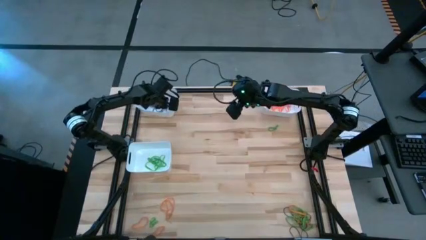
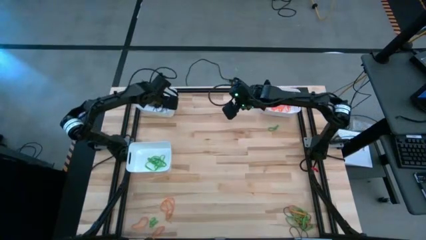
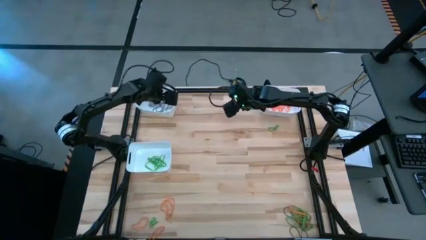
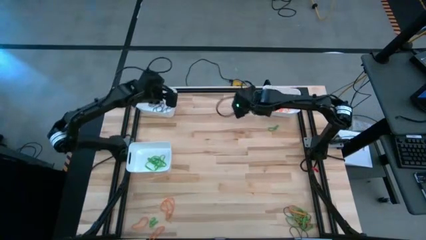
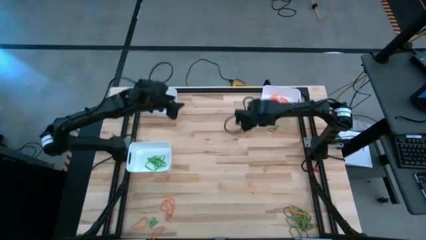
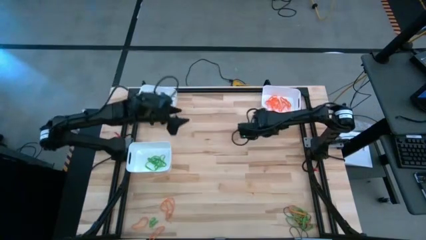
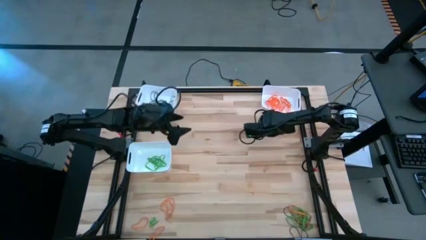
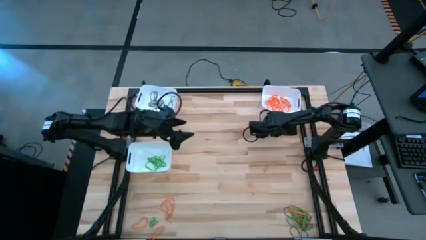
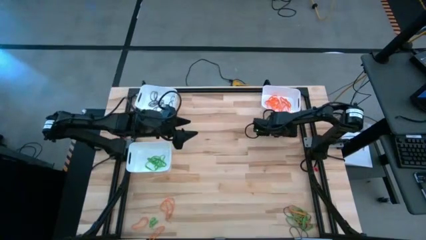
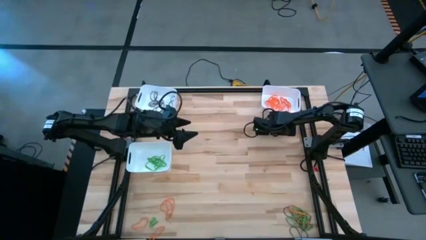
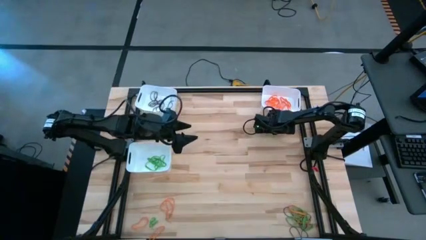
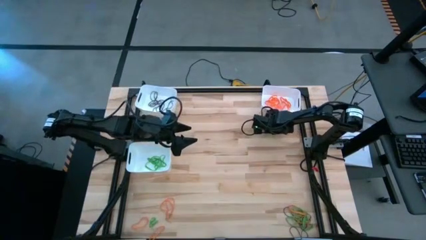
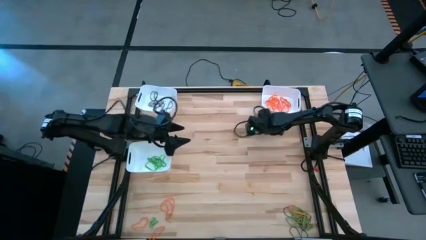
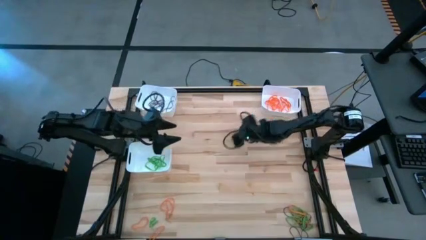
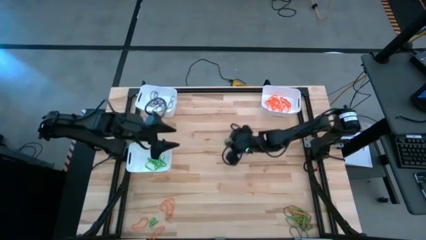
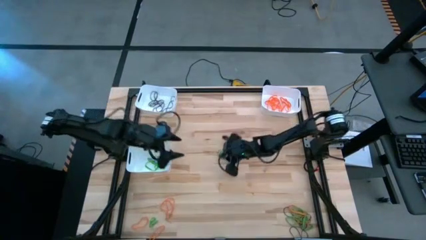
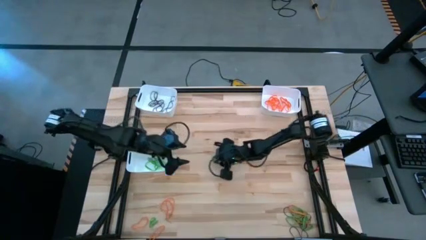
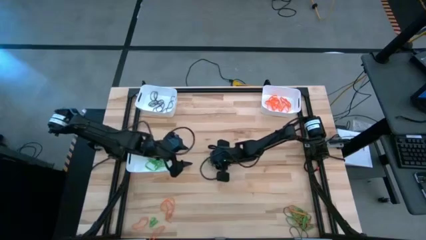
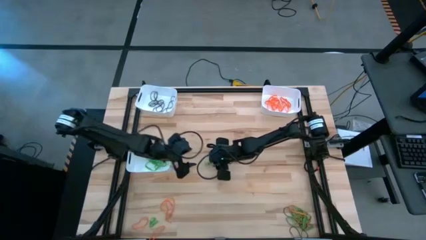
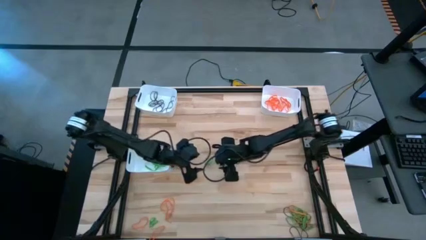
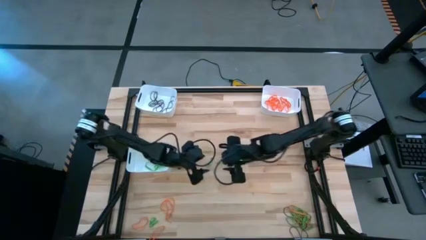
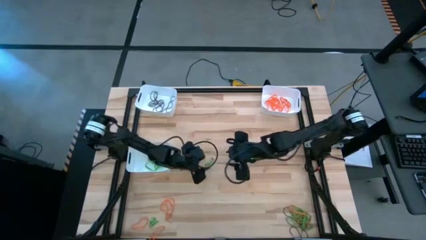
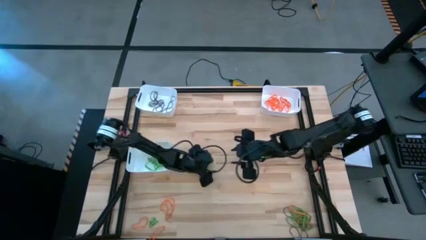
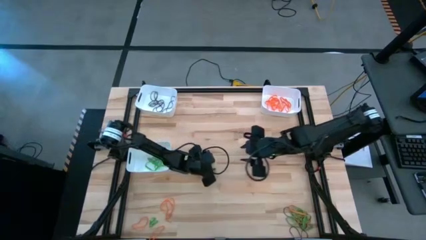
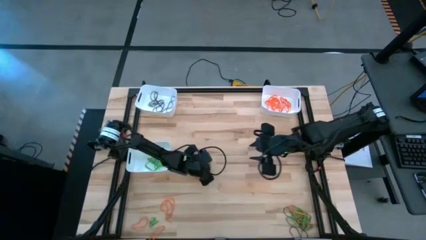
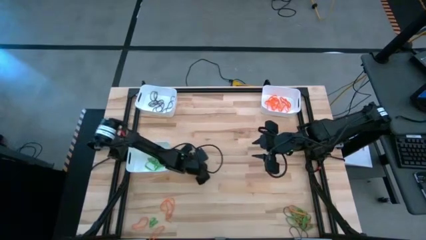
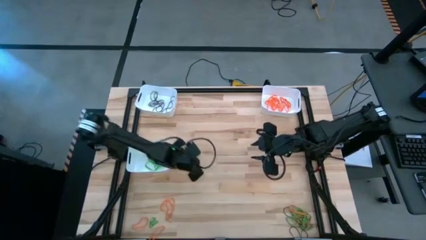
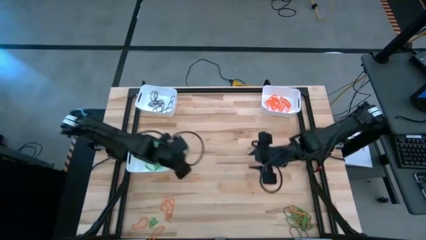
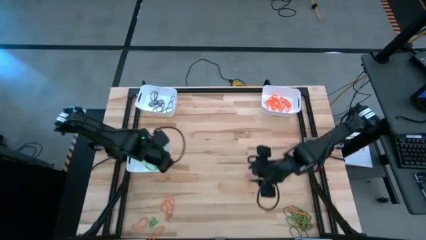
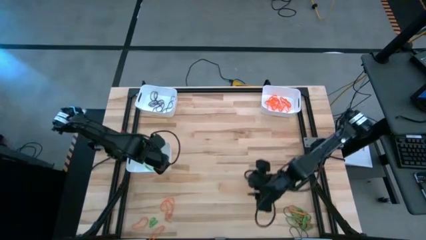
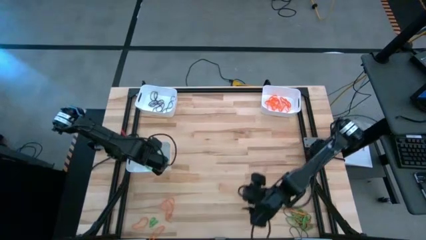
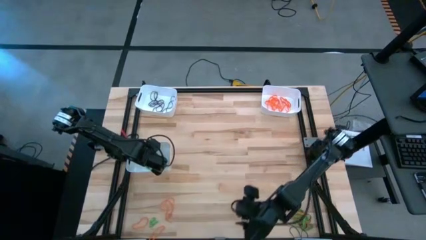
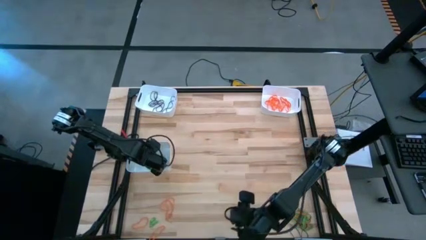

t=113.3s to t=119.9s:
Task: Sort rubber bands into baskets
Put the green rubber band into the bottom white bin

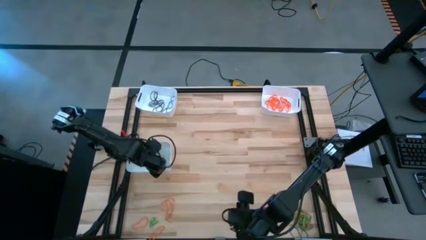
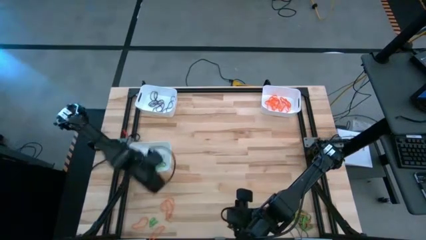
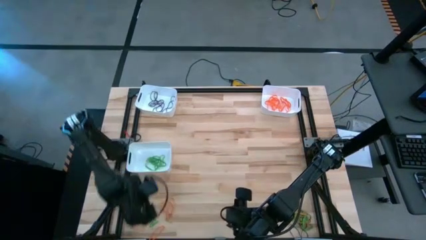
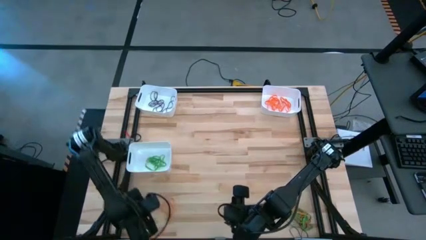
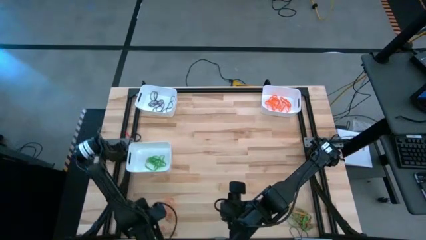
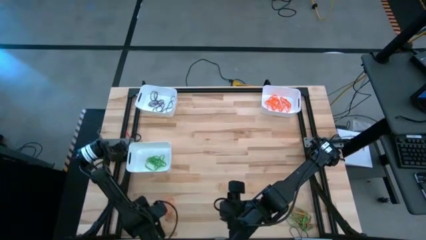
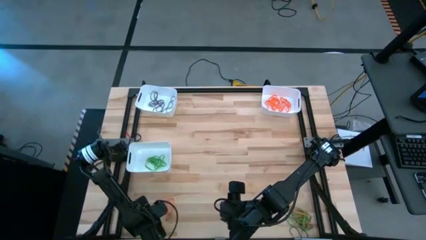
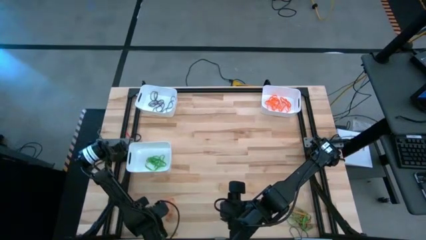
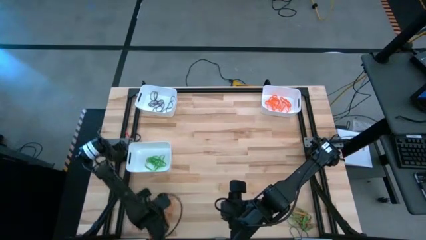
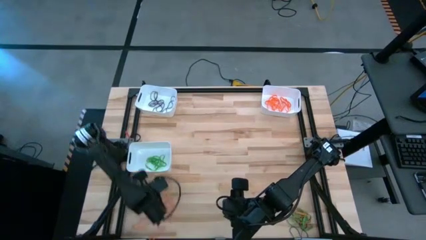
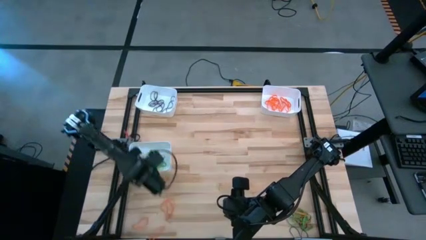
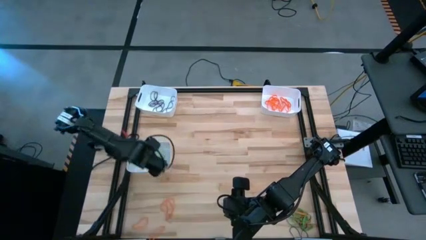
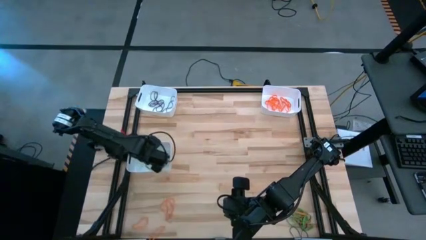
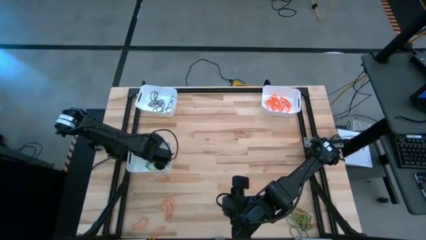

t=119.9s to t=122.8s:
Put the green rubber band into the bottom white bin

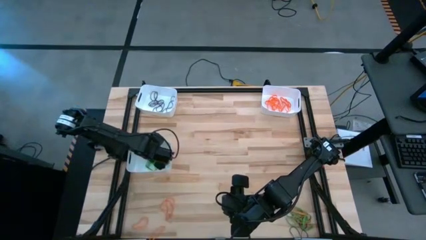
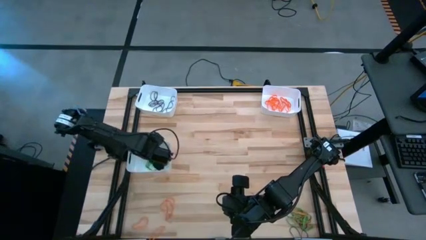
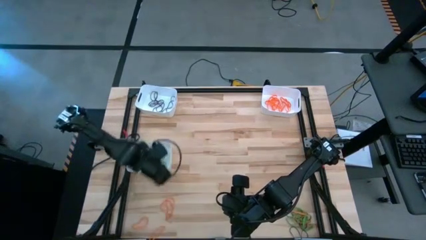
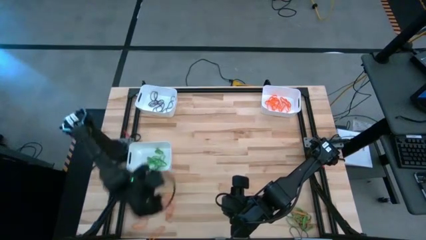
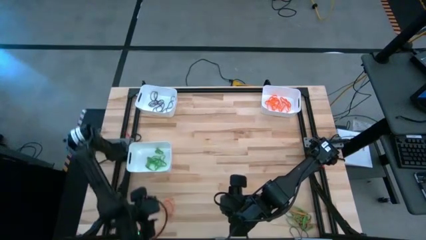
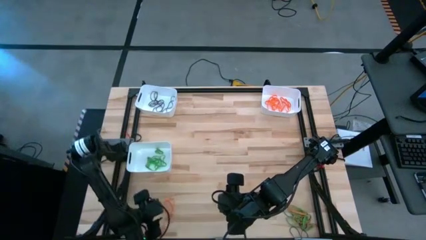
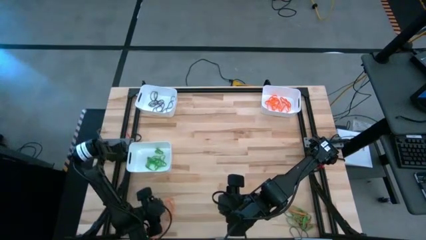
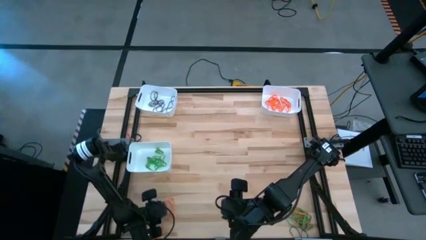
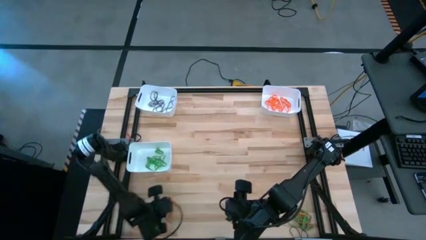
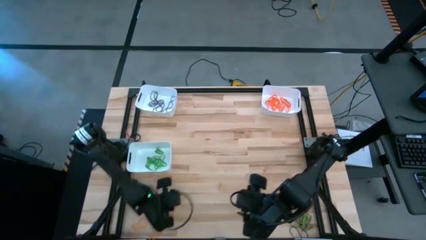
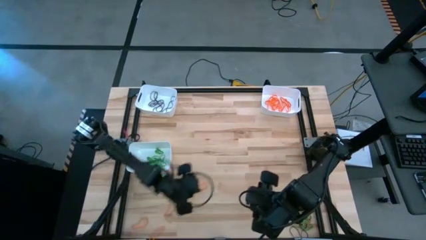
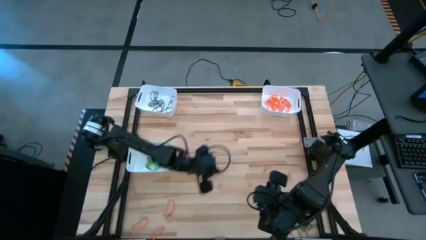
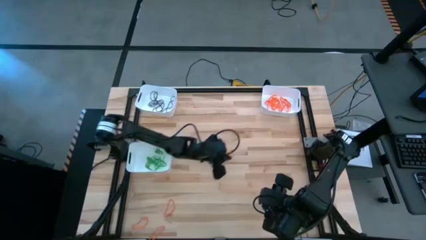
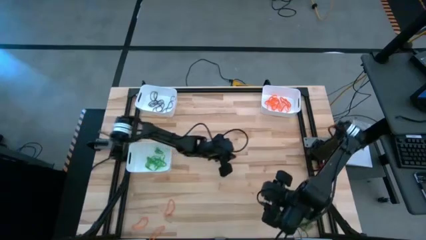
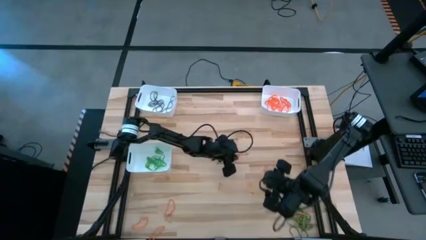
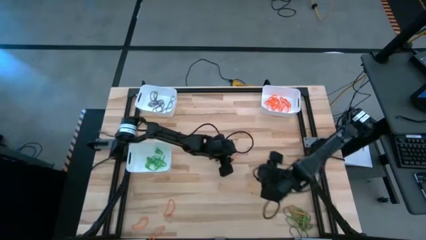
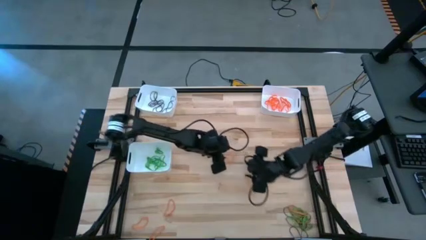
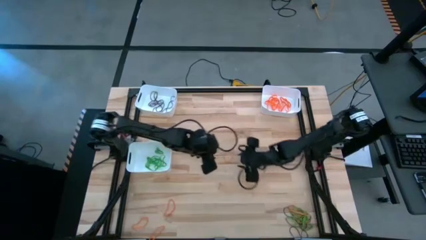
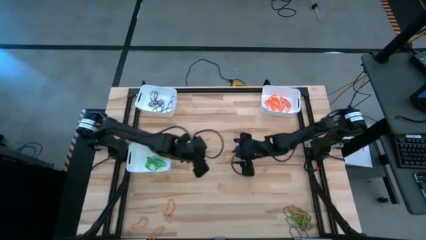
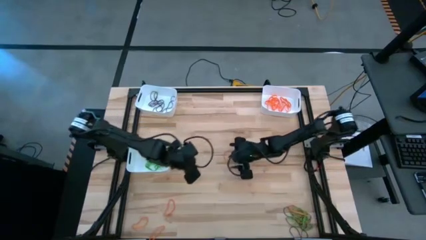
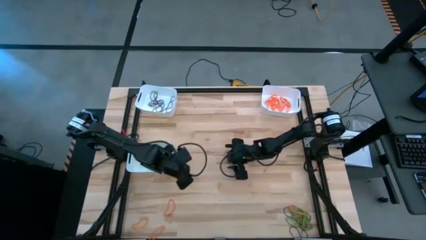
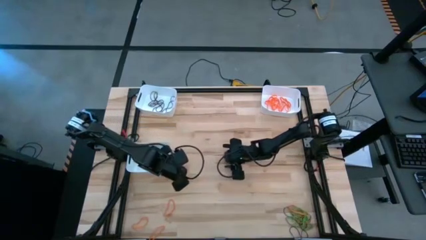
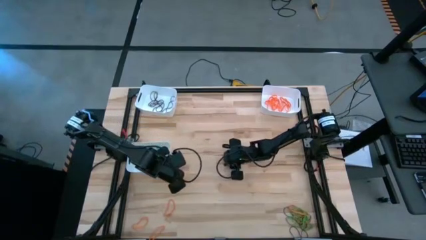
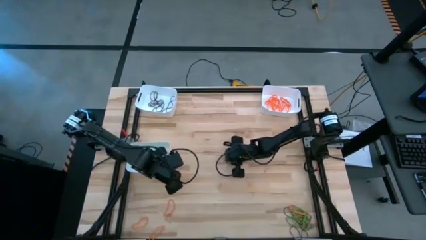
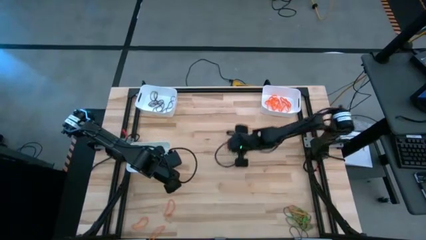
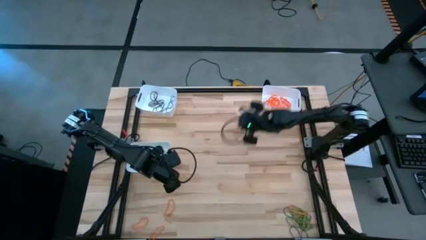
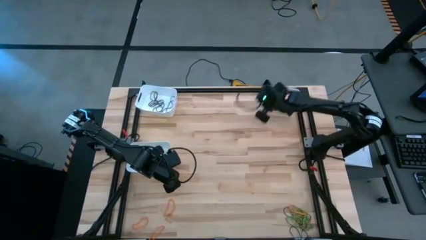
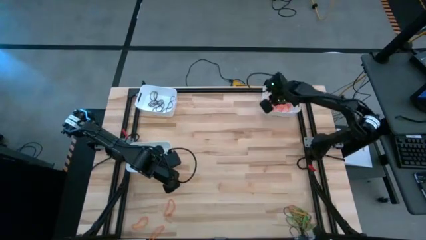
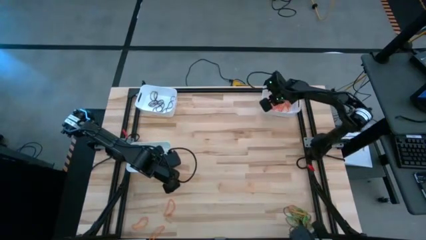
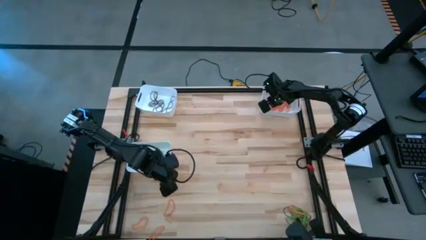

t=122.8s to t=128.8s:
Put the orange rubber band into the top right white bin
